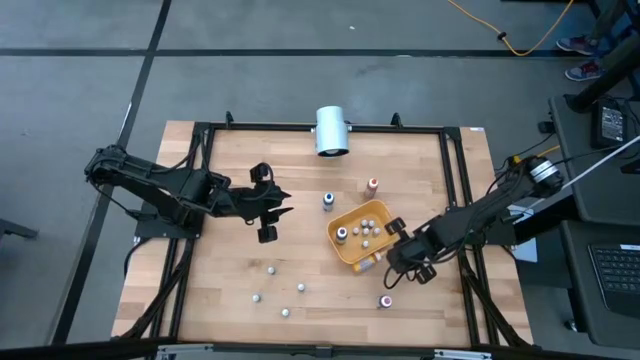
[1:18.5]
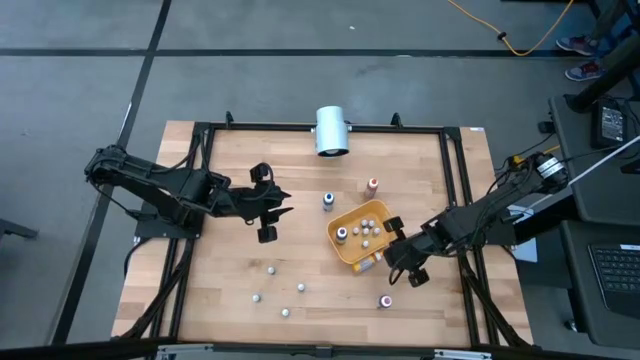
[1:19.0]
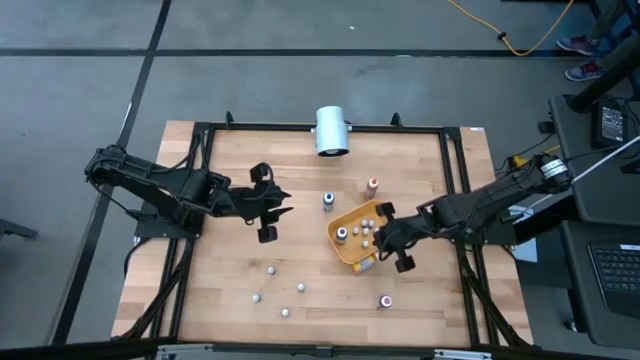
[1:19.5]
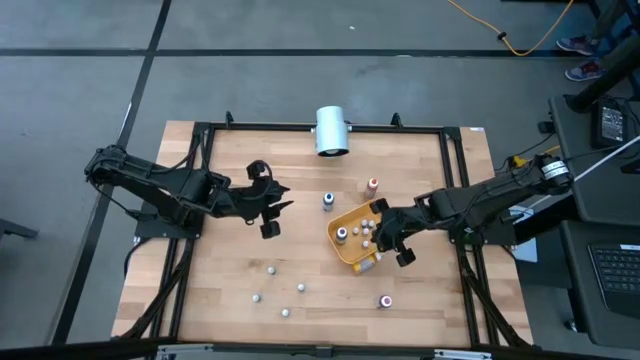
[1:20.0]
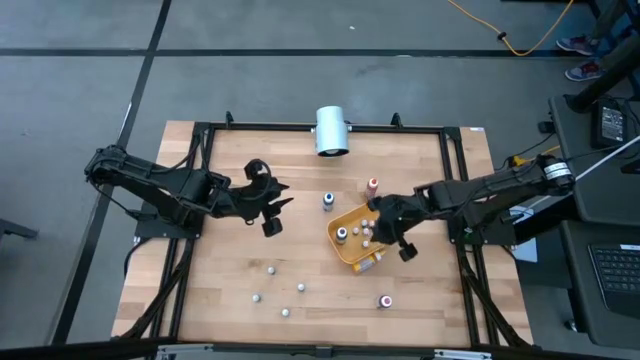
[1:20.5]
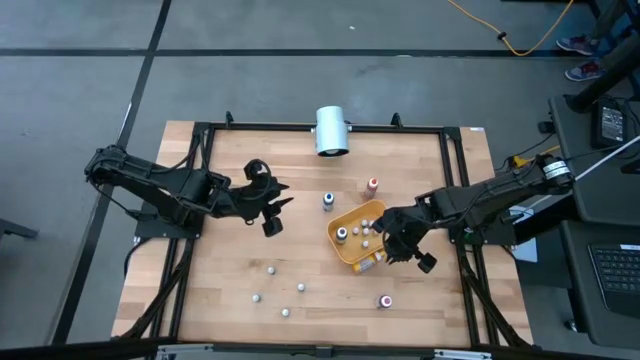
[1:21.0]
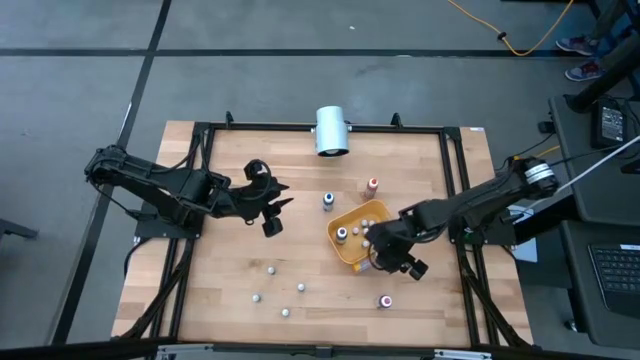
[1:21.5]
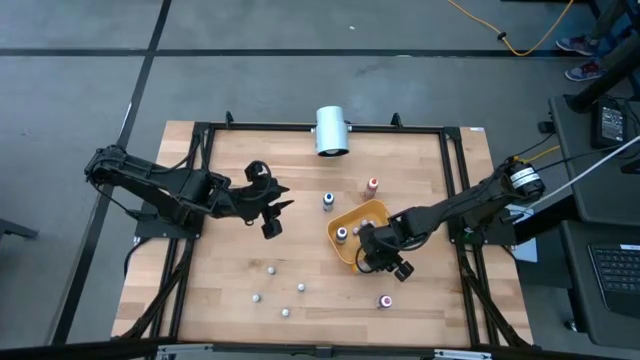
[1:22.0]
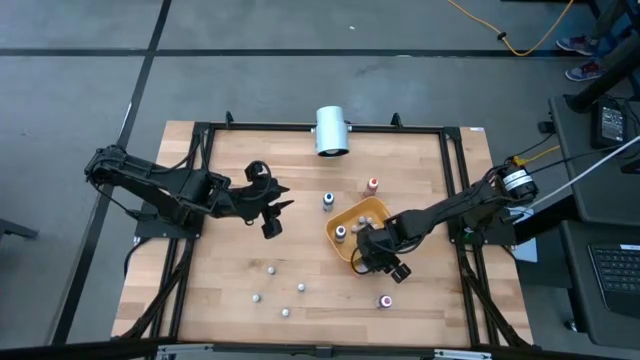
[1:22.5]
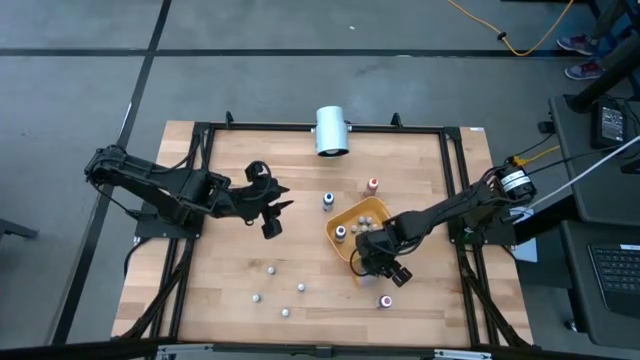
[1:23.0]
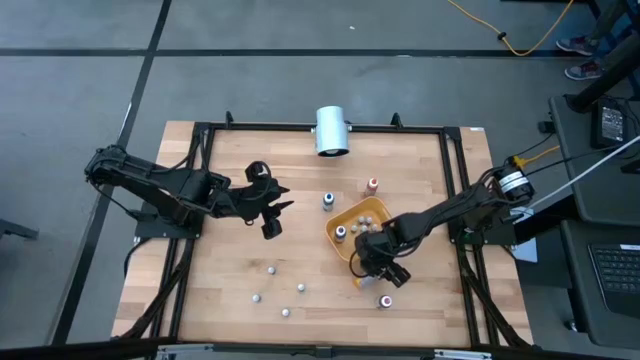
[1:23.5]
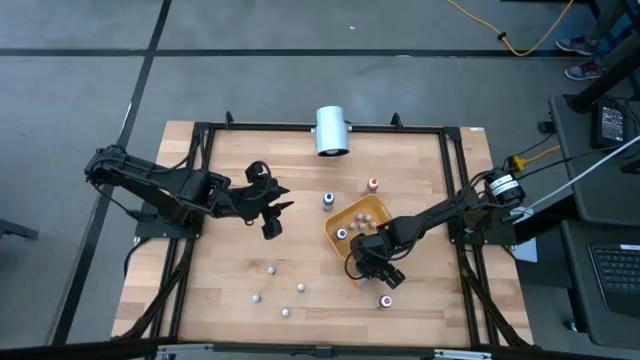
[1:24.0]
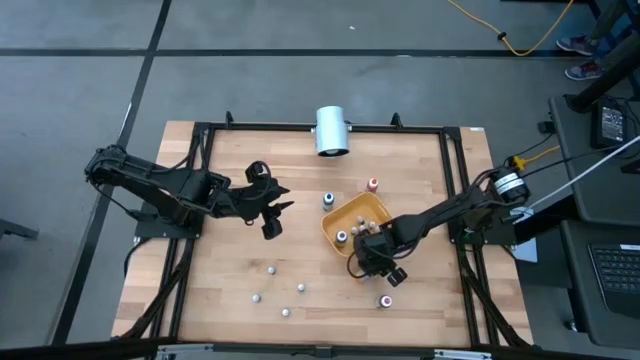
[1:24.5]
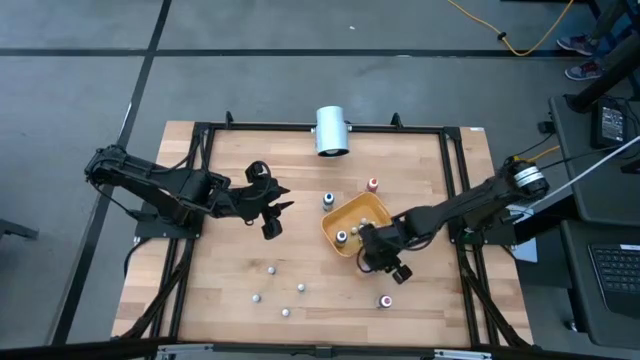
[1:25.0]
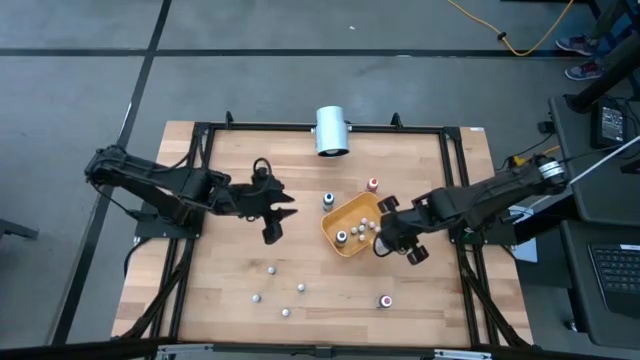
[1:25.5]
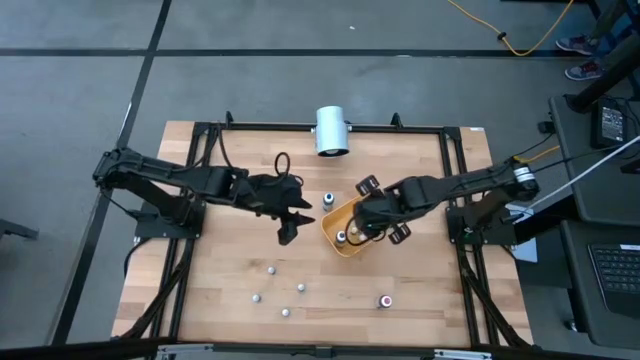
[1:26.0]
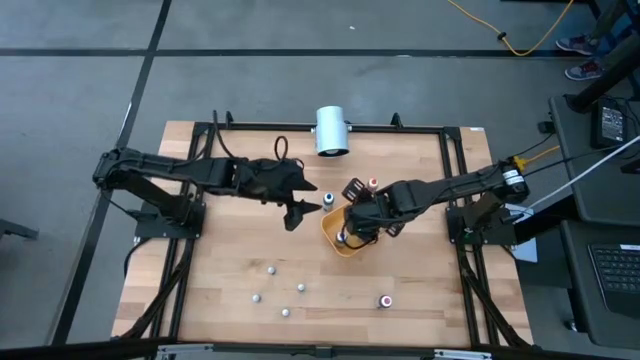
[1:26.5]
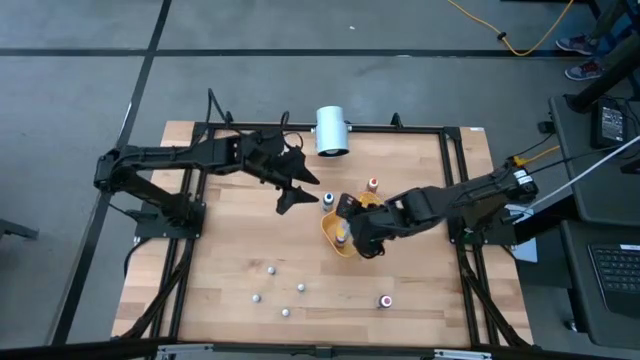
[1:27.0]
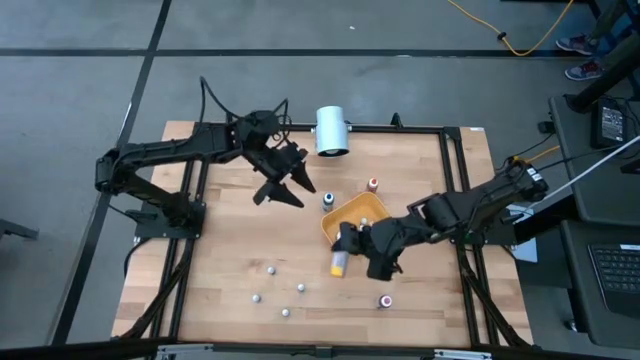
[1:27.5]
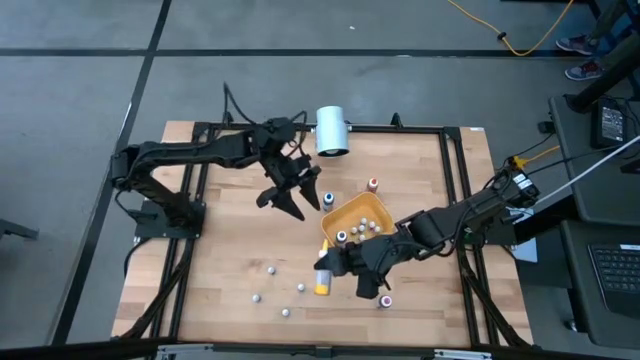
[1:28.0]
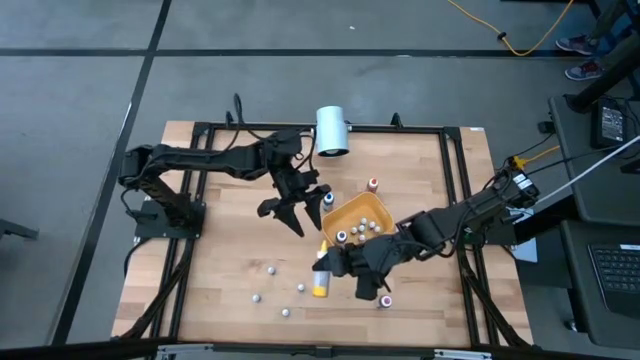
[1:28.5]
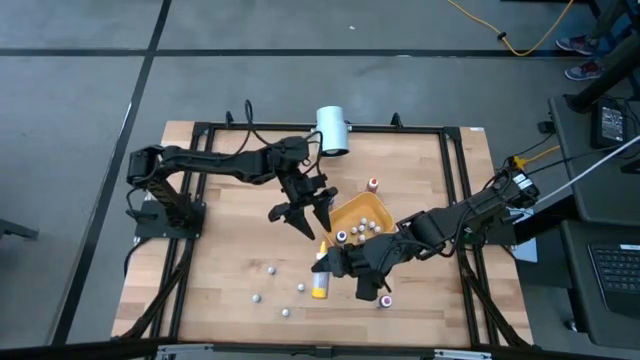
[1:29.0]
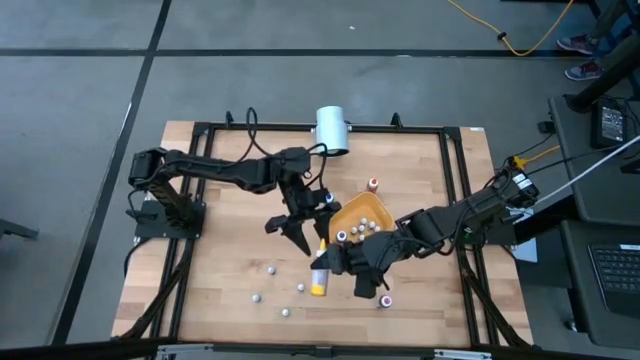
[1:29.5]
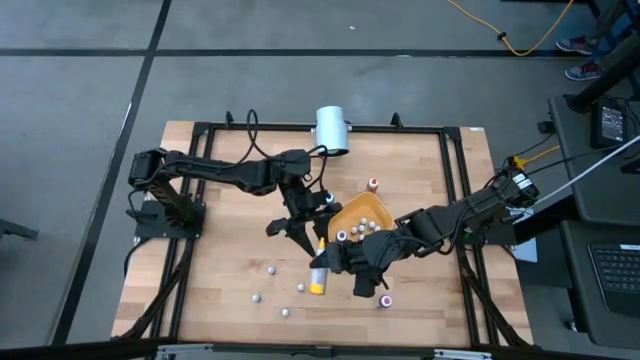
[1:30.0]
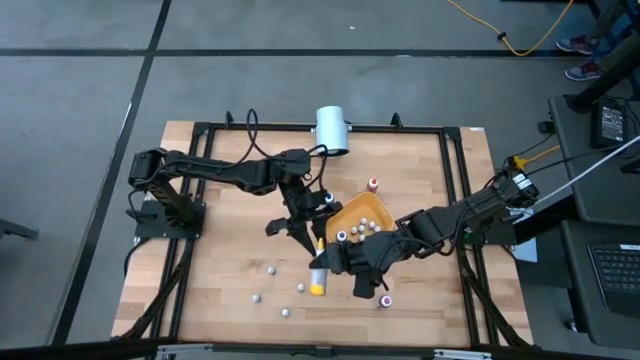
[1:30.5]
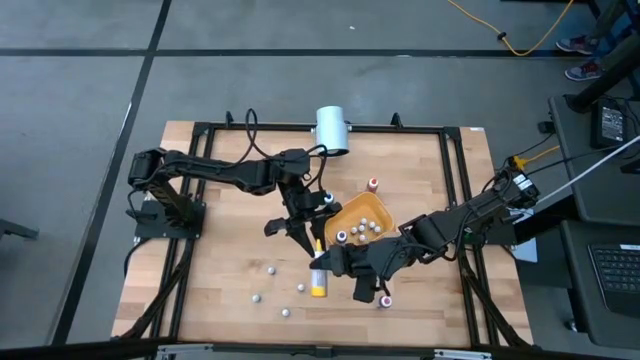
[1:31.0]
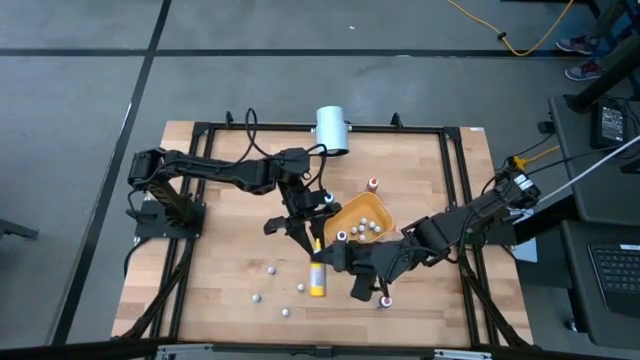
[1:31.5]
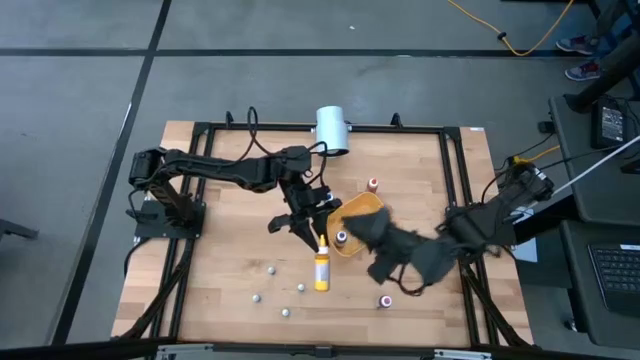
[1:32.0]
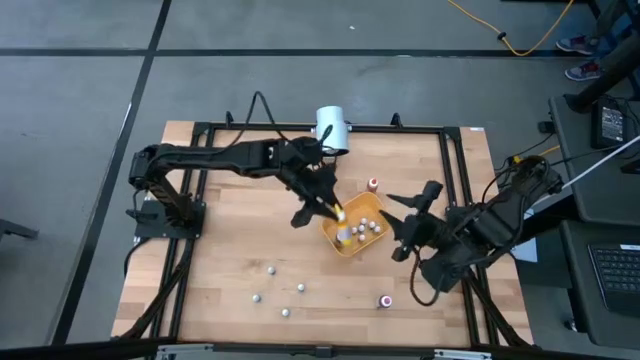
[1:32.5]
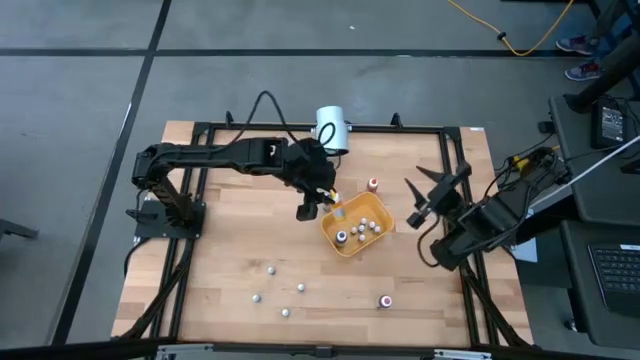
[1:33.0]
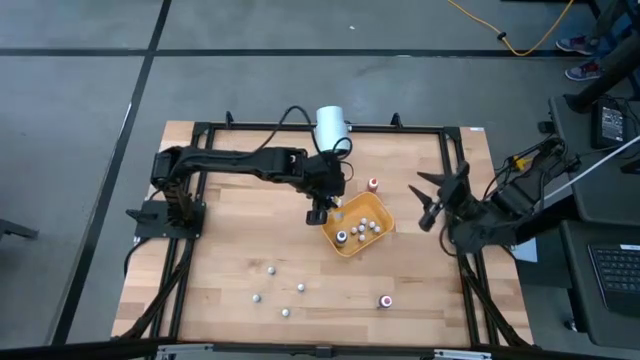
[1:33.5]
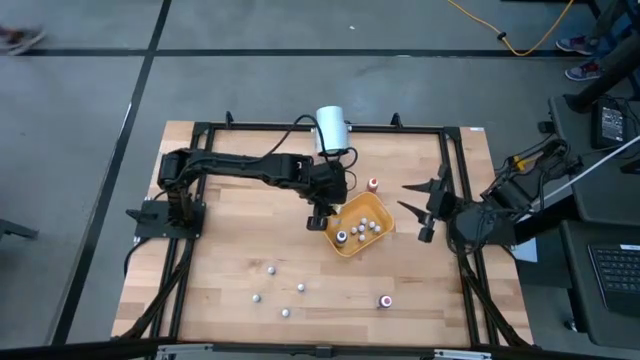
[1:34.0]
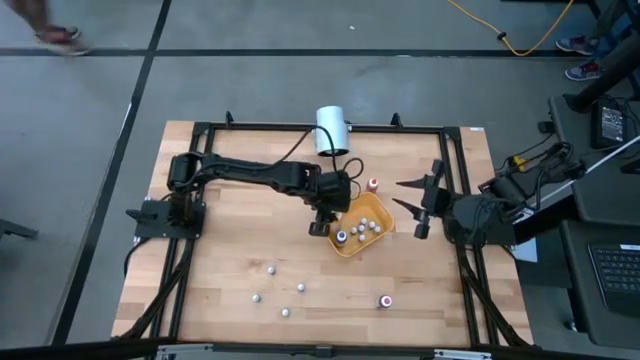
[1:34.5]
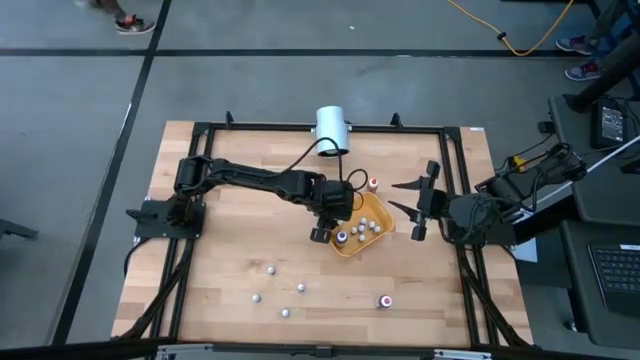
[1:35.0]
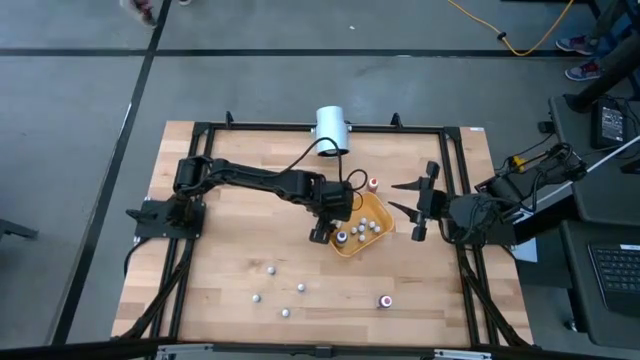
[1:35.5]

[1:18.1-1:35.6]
Task: Pick & Place food coloring
Put the large yellow food coloring bottle into the yellow bin

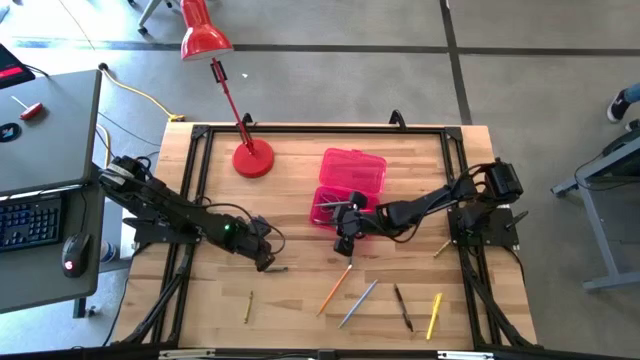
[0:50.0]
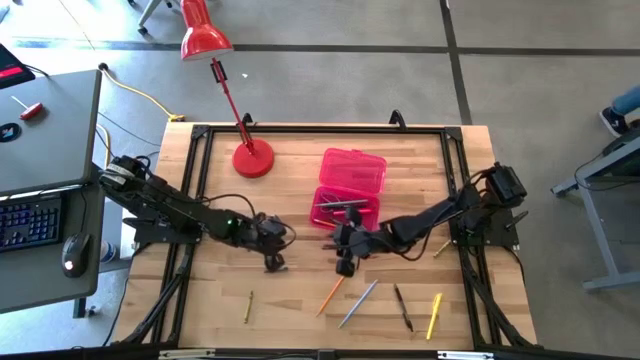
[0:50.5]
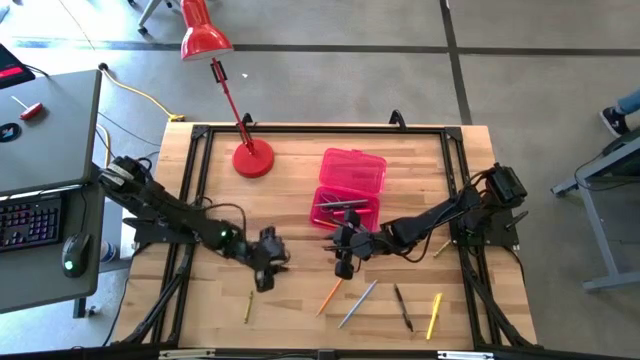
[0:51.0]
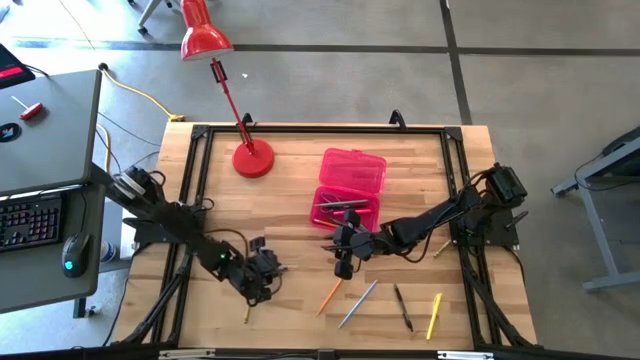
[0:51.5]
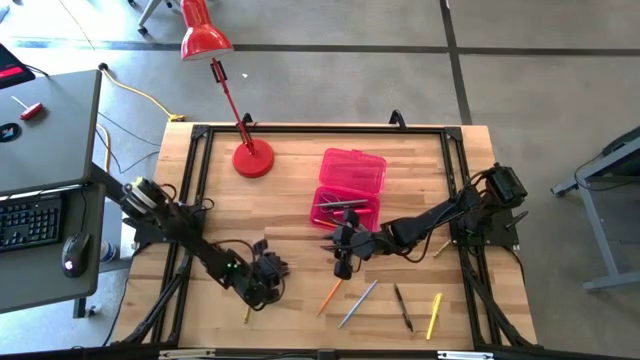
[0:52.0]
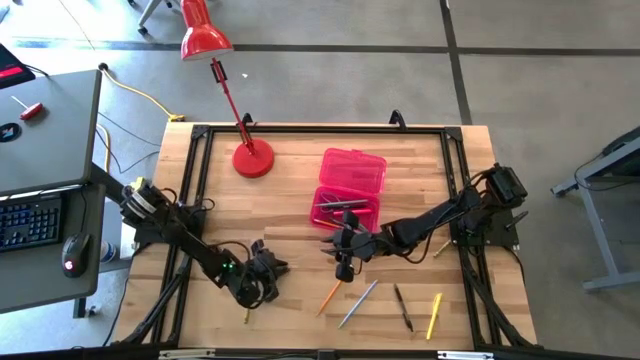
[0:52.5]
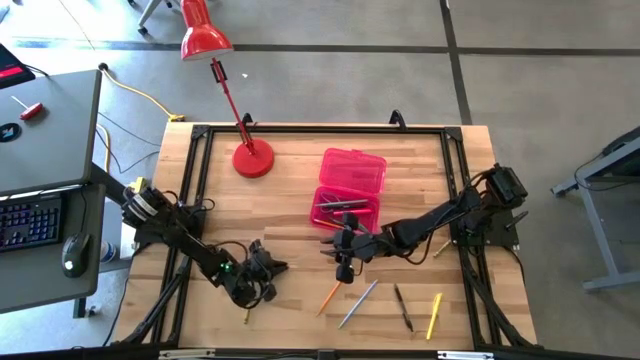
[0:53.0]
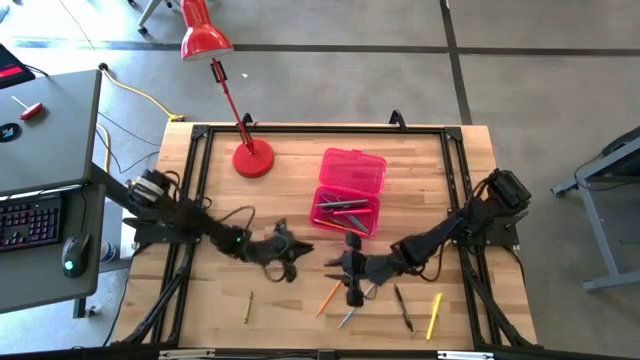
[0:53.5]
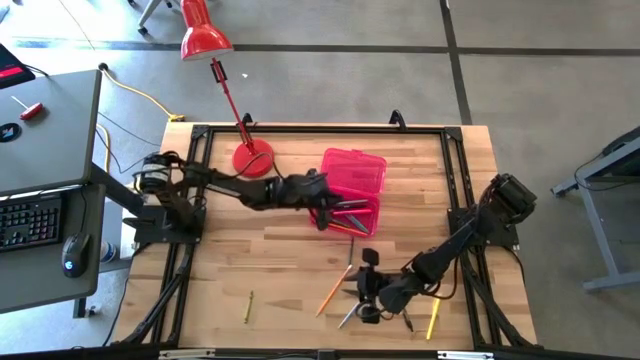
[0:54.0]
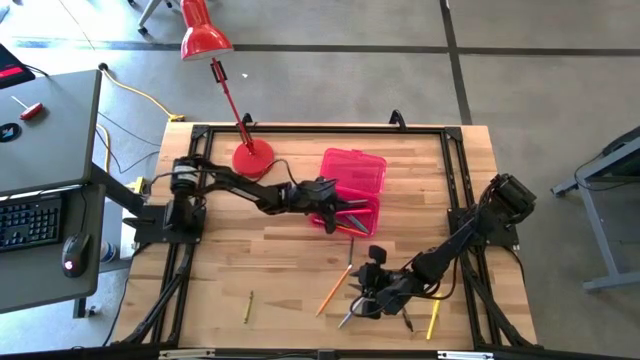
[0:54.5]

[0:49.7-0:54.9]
Task: Pick & place school supplies into a supply box
Put the left dark green crayon into the red supply box
